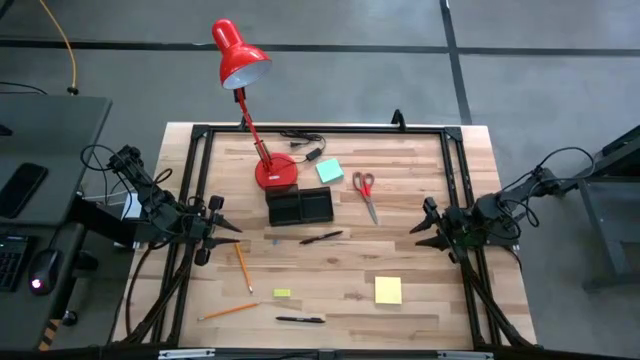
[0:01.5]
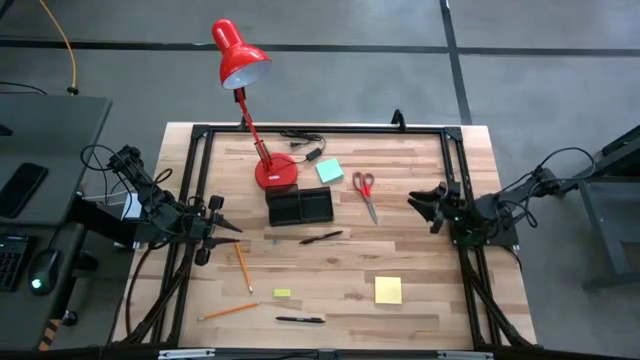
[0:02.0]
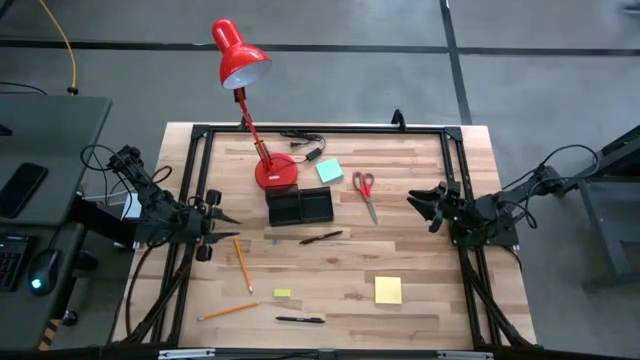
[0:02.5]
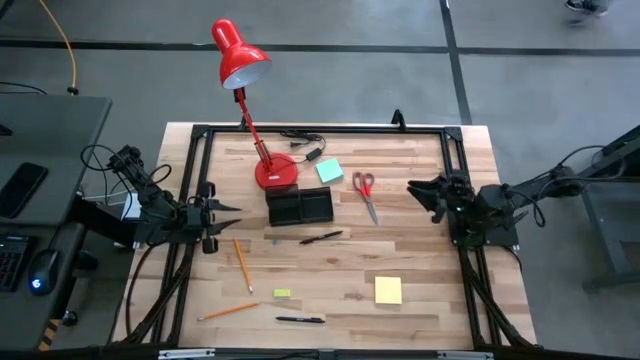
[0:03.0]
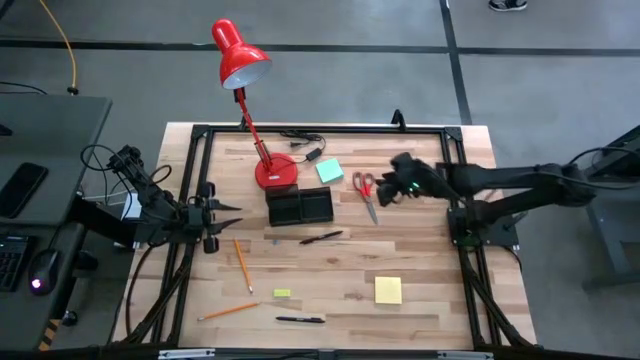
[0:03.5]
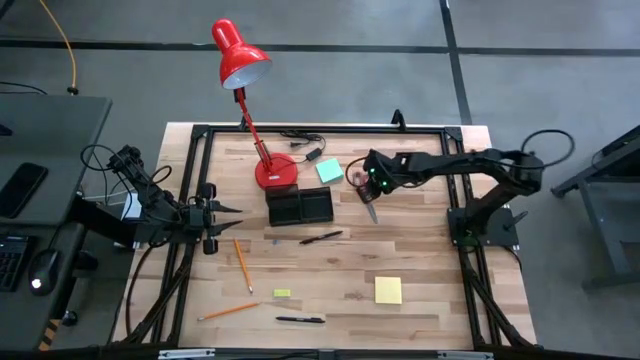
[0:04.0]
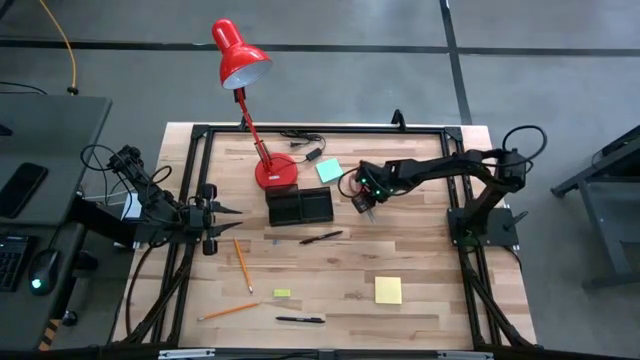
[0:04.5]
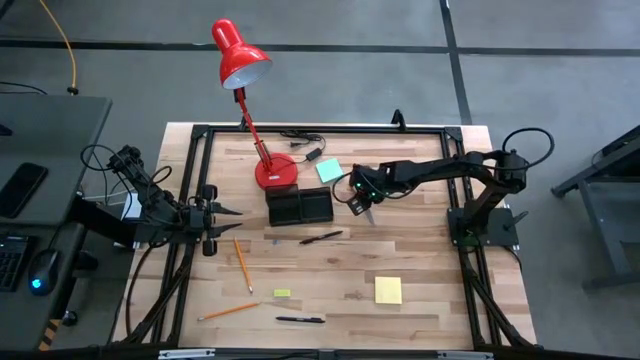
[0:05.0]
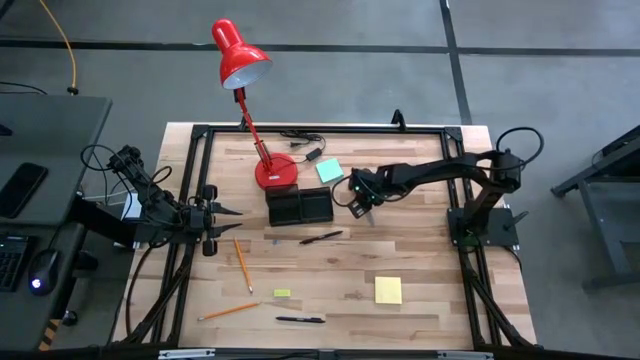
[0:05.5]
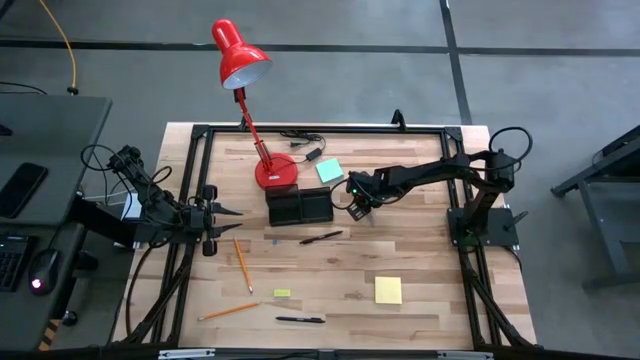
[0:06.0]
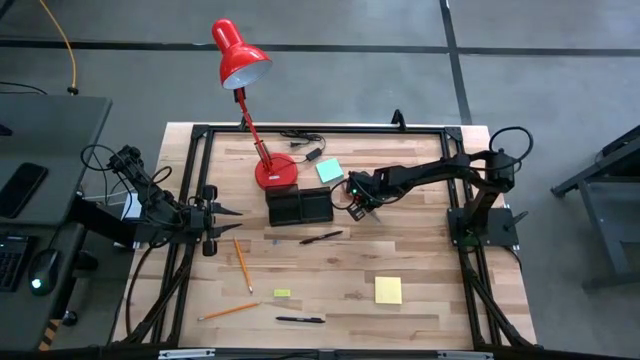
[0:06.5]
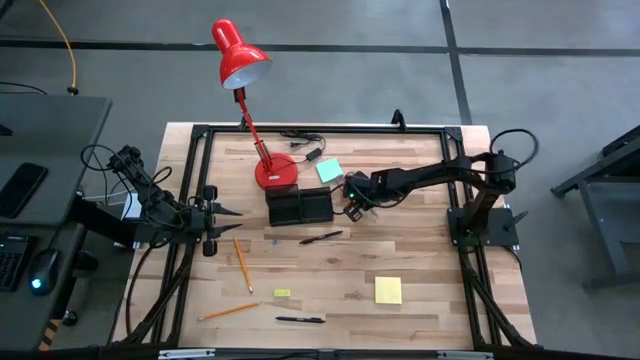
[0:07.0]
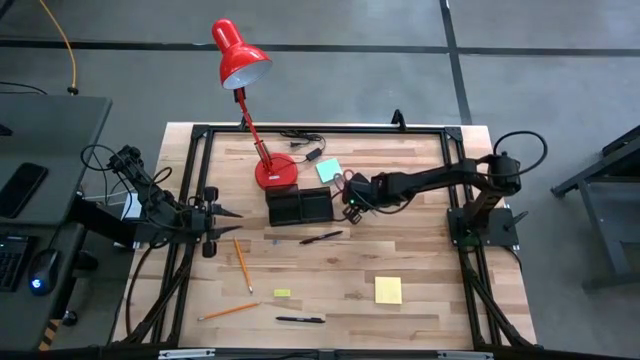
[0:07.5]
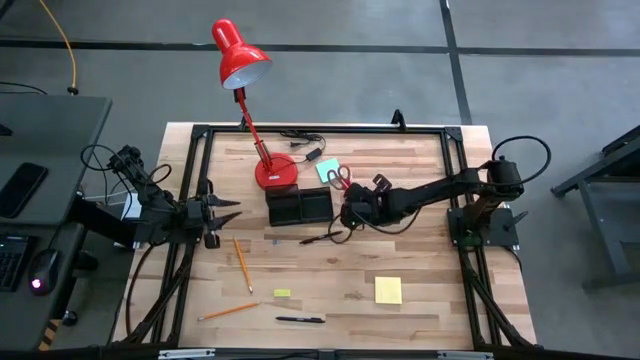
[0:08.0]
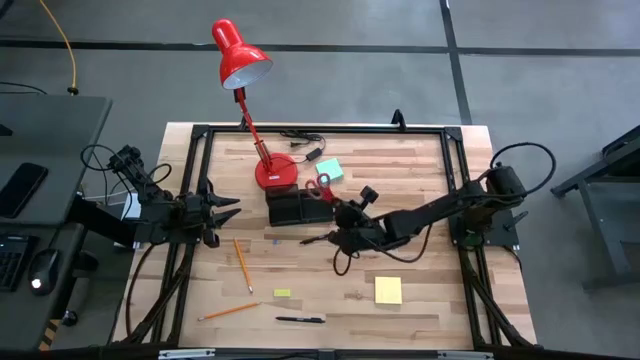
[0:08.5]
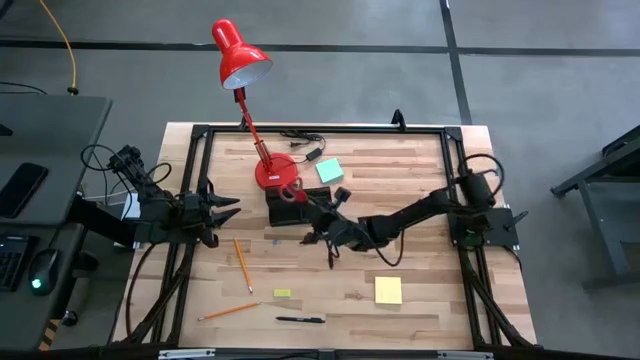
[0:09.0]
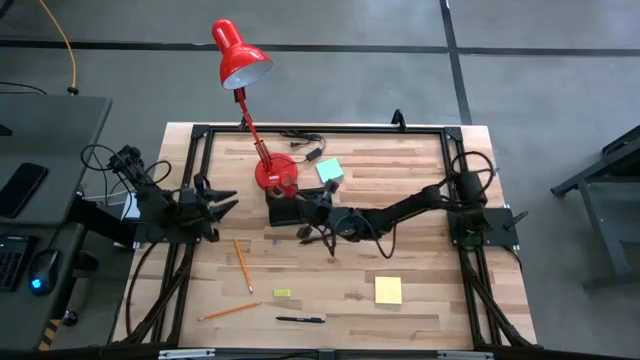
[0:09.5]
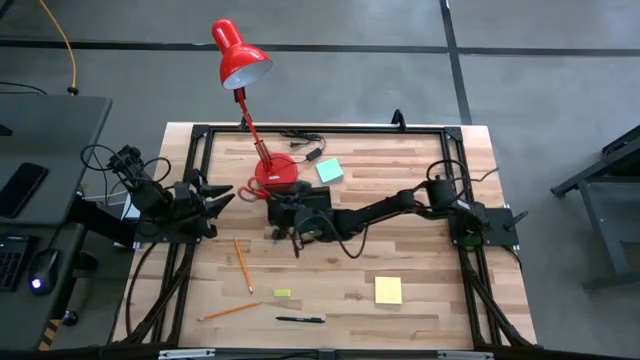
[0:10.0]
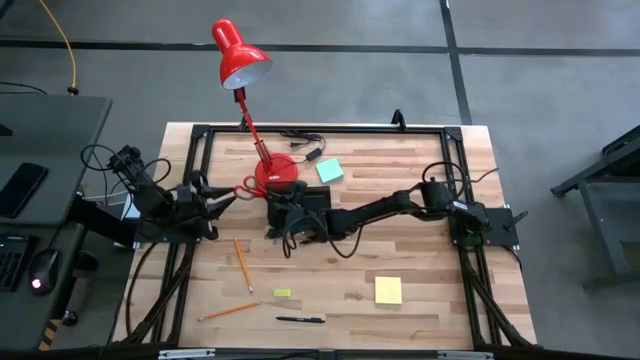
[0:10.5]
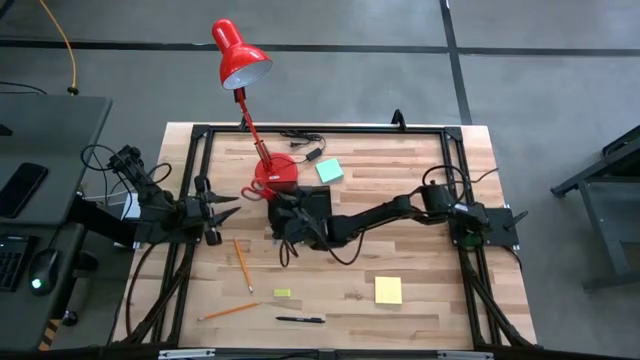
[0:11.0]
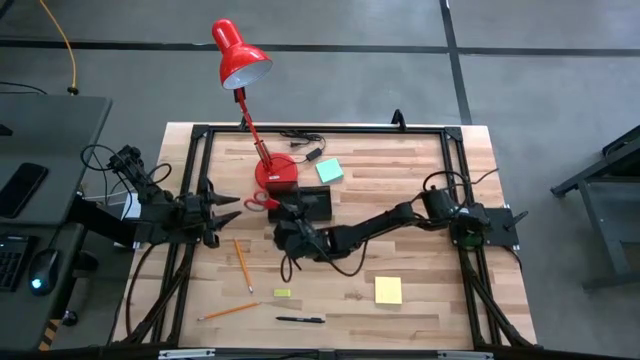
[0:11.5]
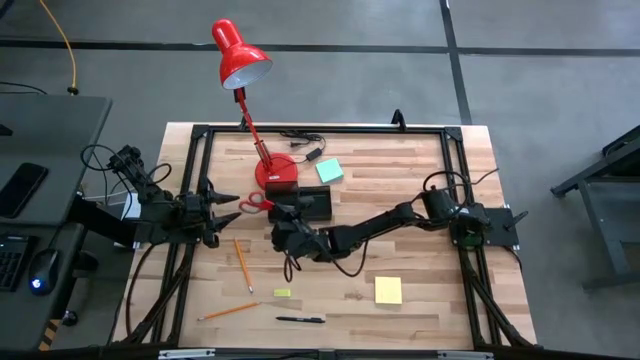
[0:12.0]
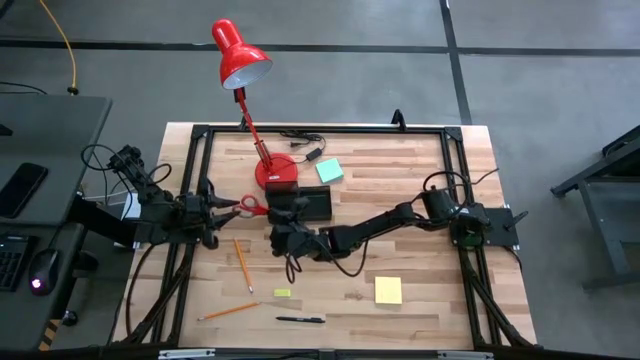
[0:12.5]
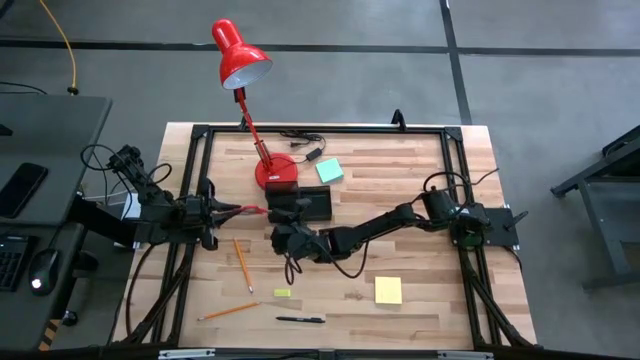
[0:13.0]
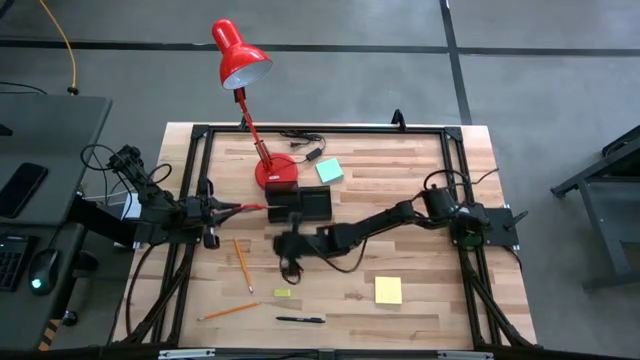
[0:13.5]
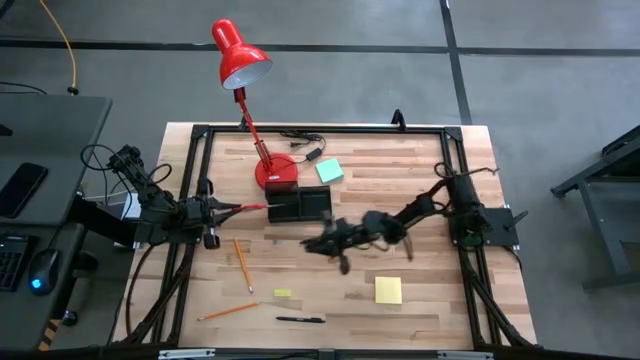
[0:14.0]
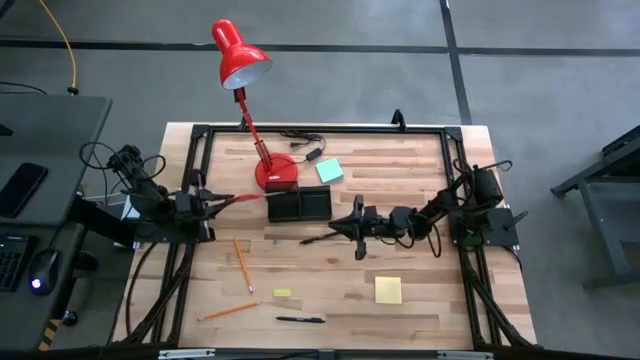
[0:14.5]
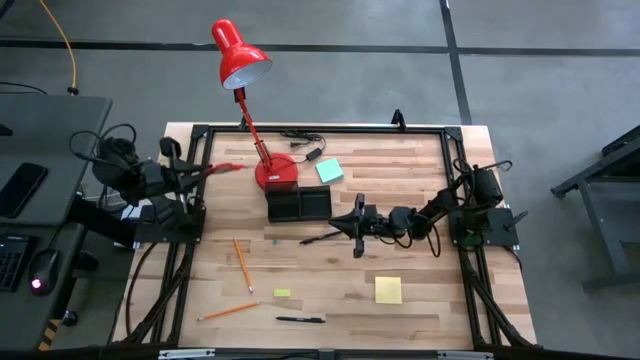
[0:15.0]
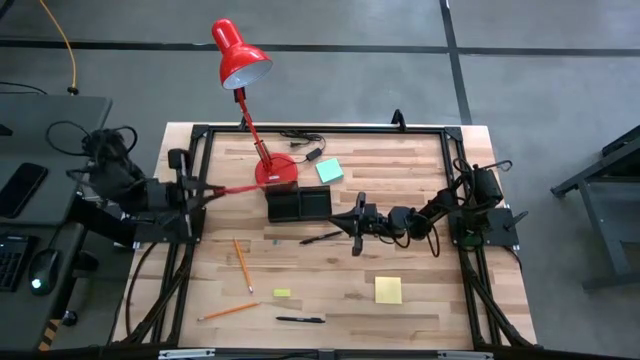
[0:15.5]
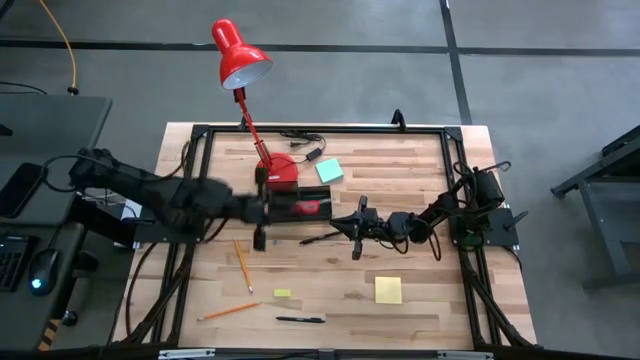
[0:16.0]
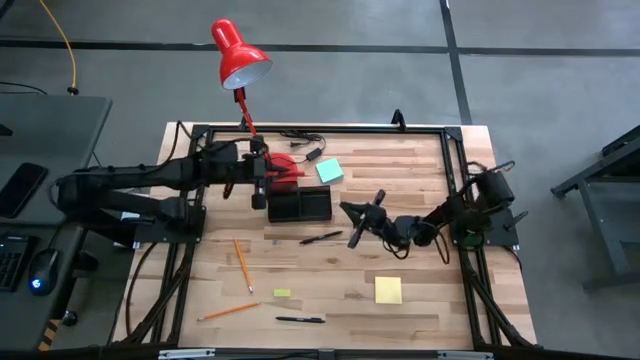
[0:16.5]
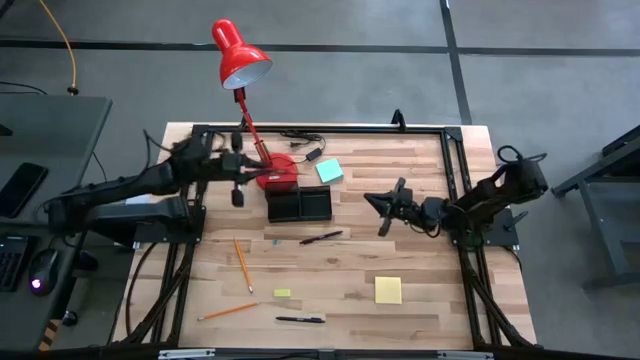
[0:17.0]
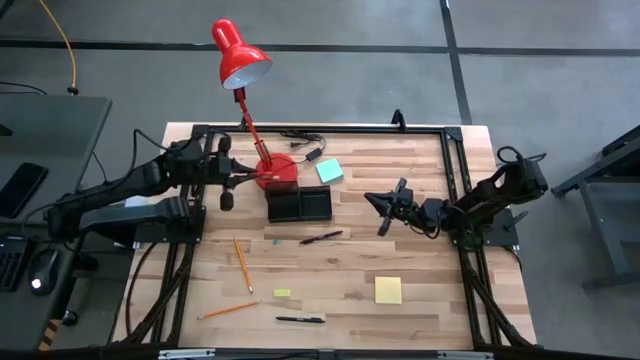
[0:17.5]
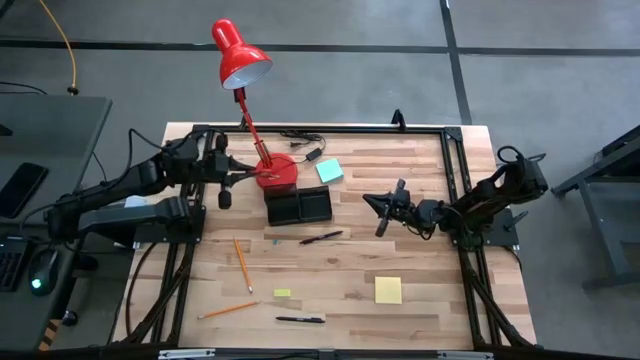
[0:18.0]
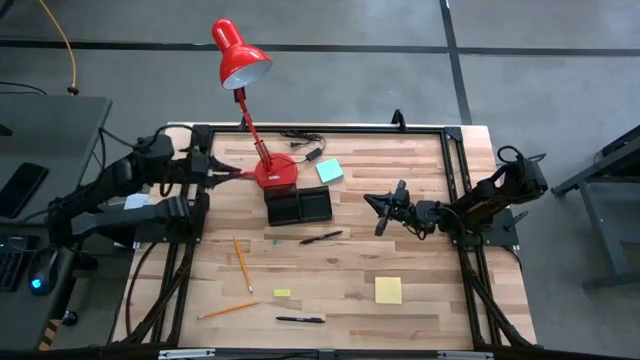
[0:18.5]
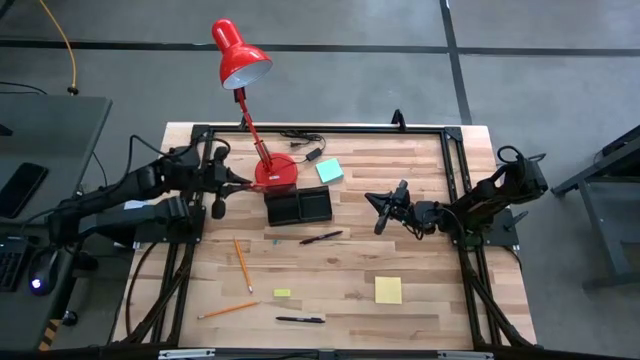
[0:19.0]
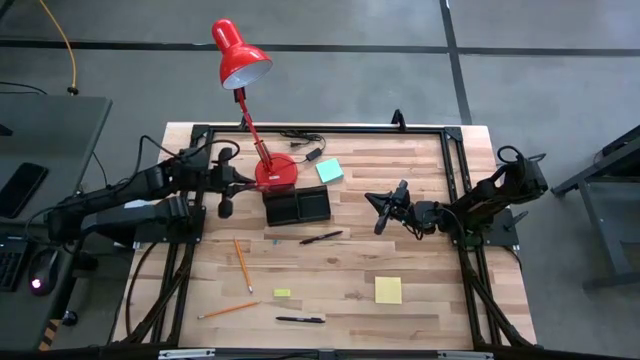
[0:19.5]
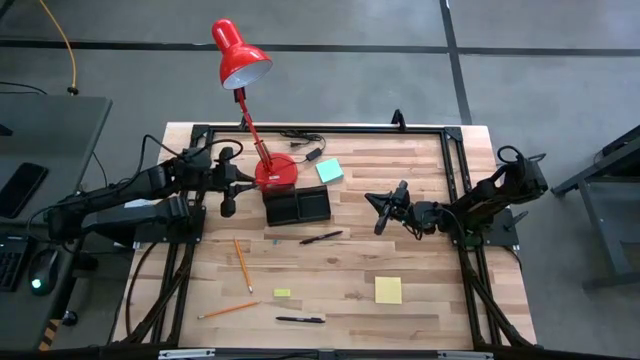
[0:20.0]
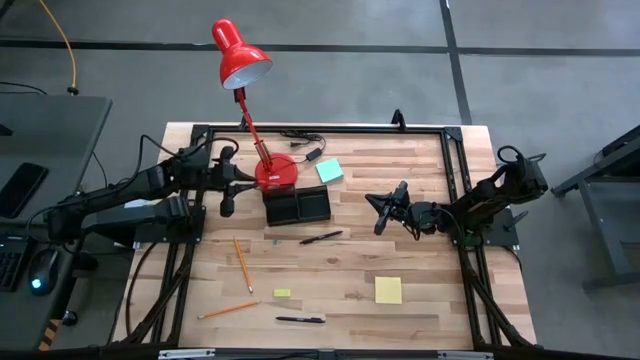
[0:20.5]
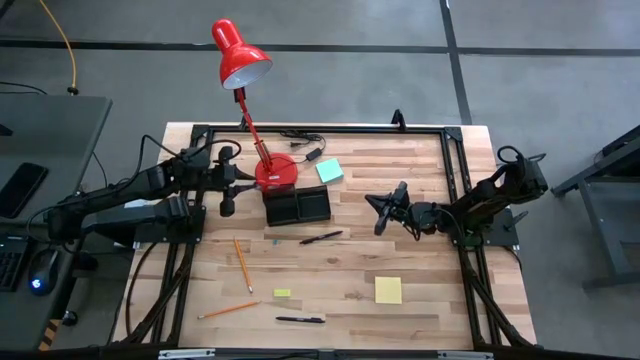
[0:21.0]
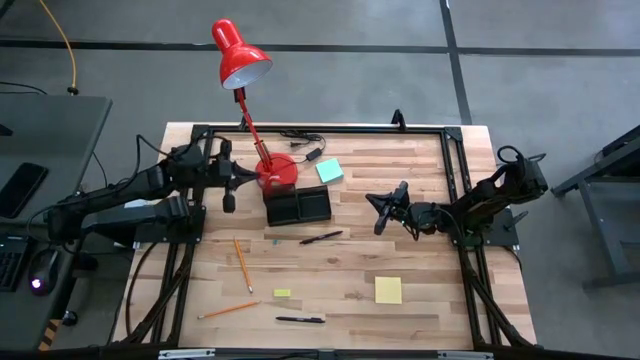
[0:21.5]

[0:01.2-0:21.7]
Task: Pick and place office supplies into organizer
Put the red scissors into the desk organizer
